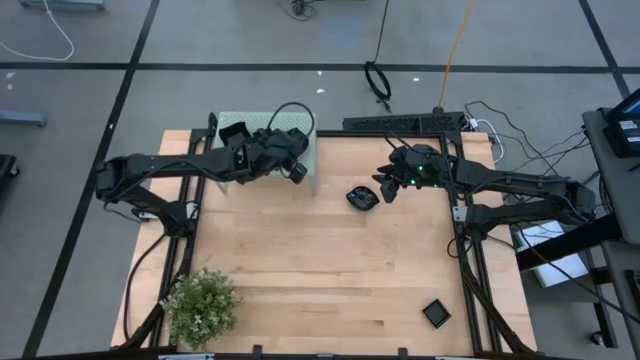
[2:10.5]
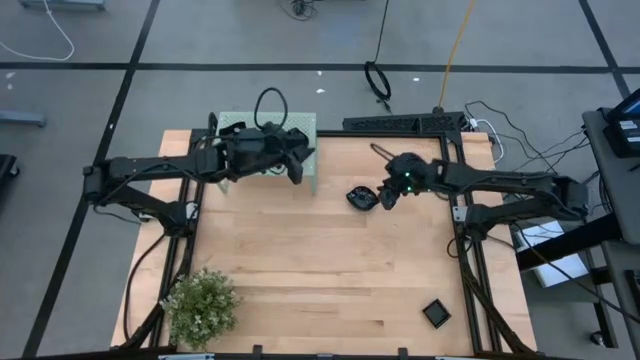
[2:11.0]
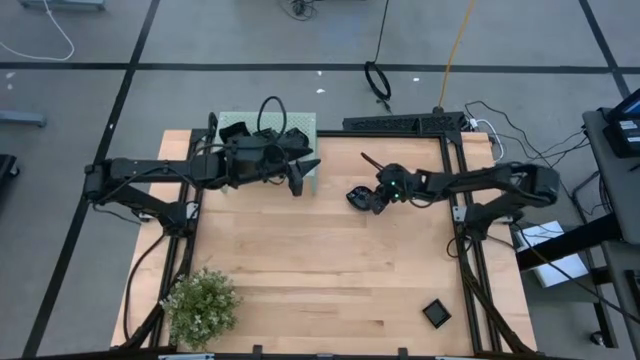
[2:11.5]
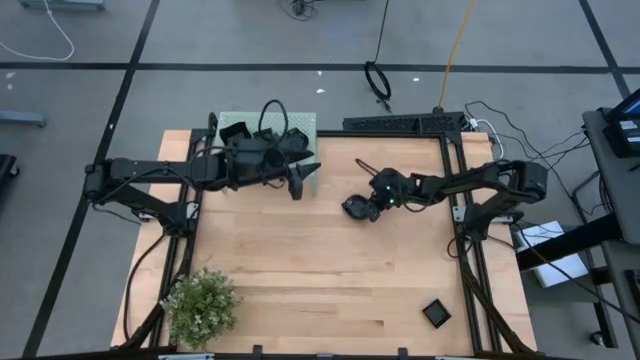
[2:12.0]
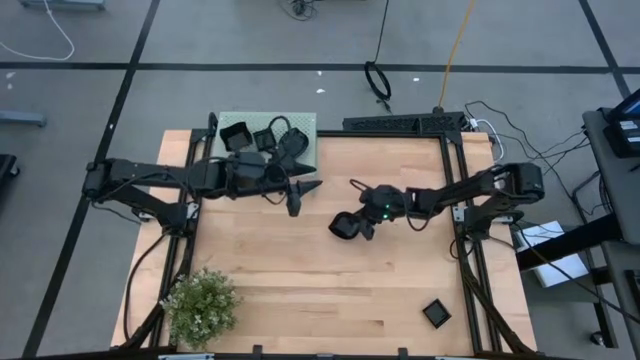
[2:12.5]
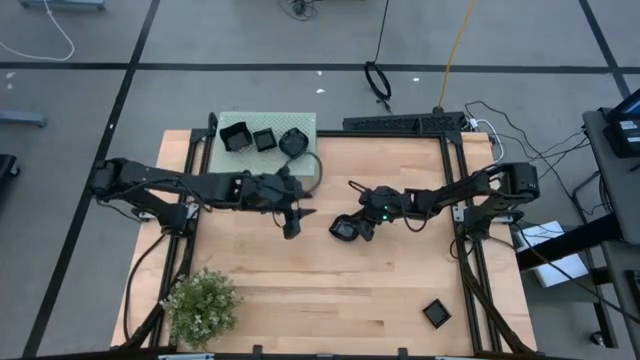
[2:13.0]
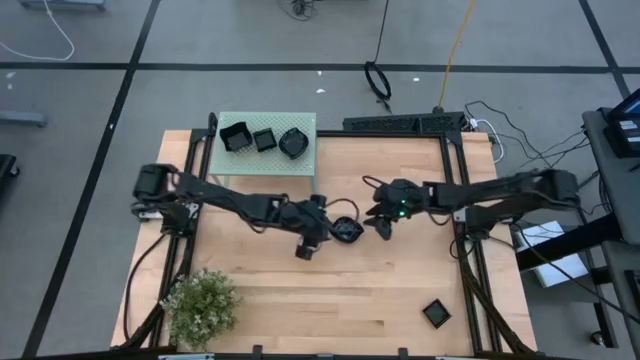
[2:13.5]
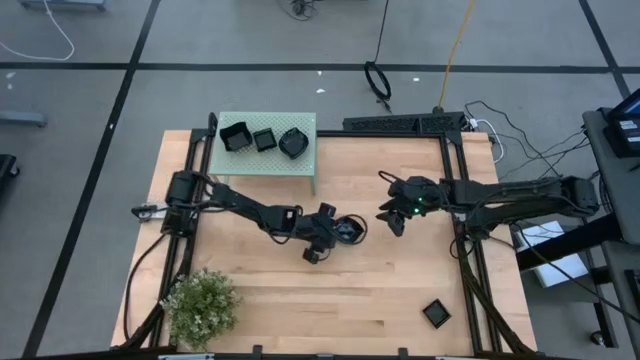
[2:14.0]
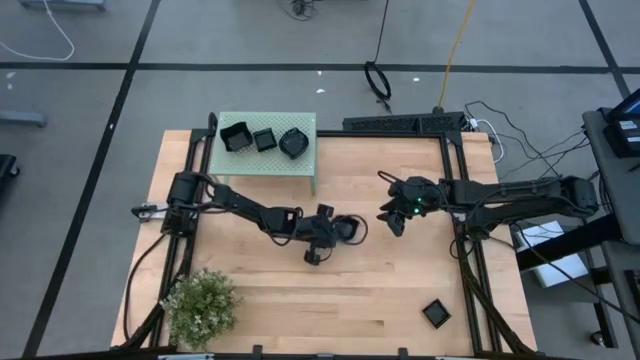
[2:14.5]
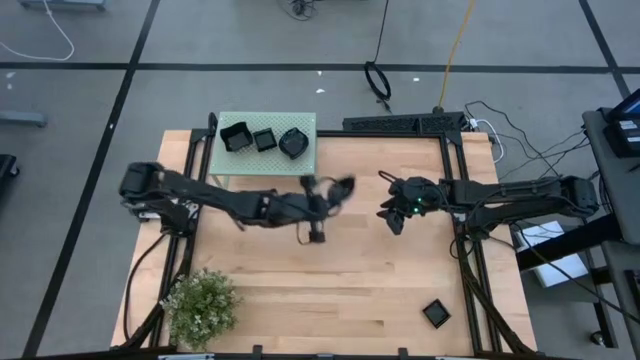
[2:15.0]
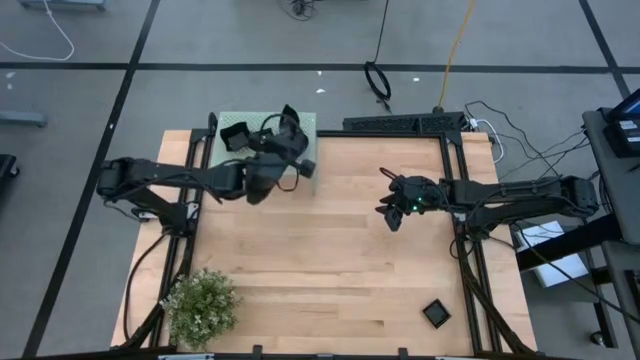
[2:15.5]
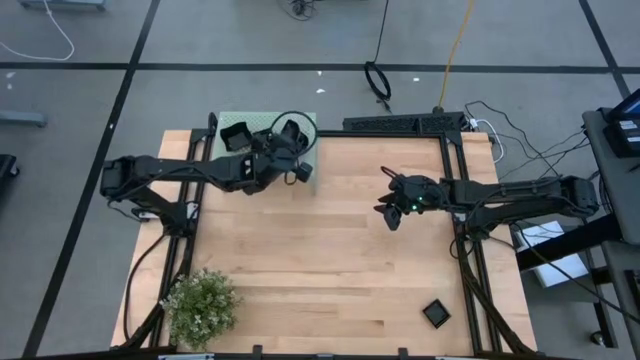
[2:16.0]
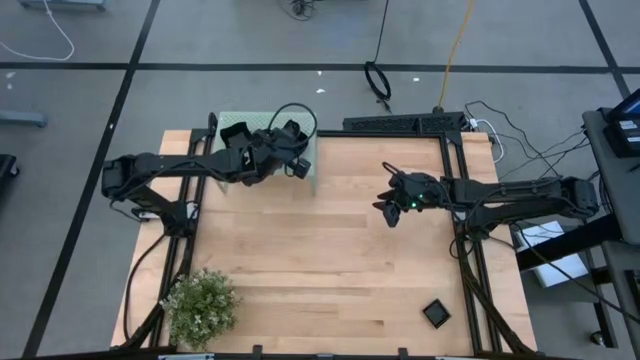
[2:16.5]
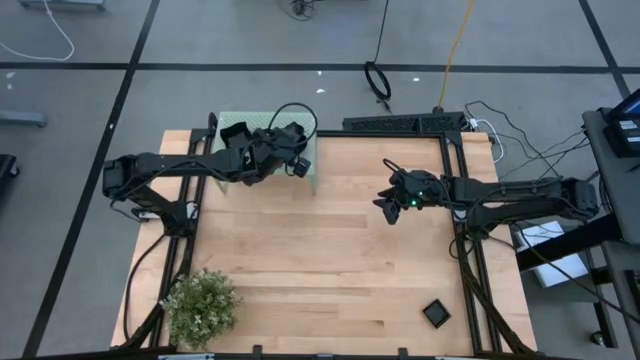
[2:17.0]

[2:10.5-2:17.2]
Task: Pick & Place Mini shaped plates
Stack the leaf shaped plate on top of the leaf shaped plate on the shelf

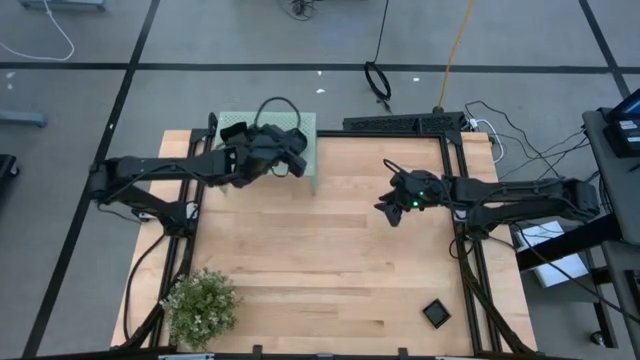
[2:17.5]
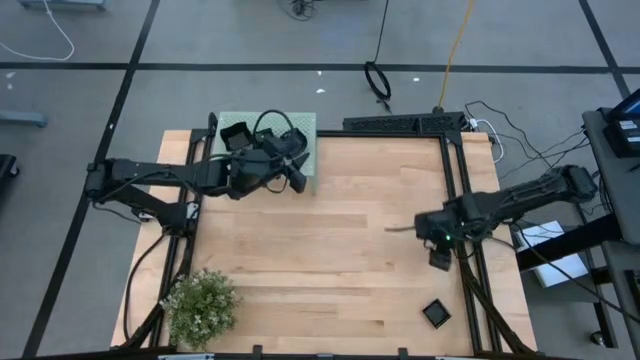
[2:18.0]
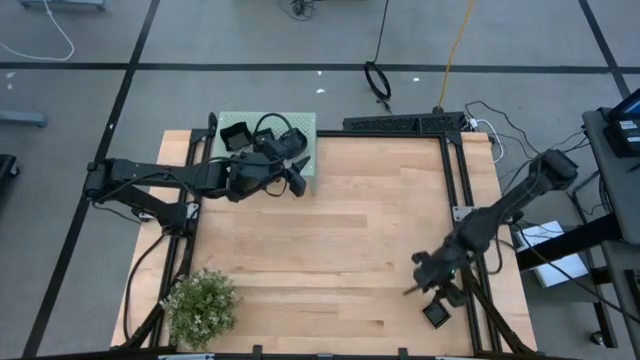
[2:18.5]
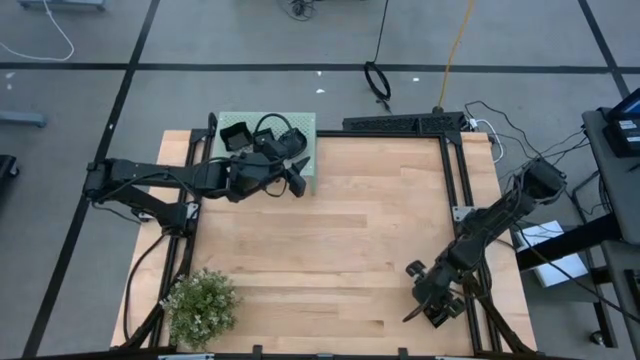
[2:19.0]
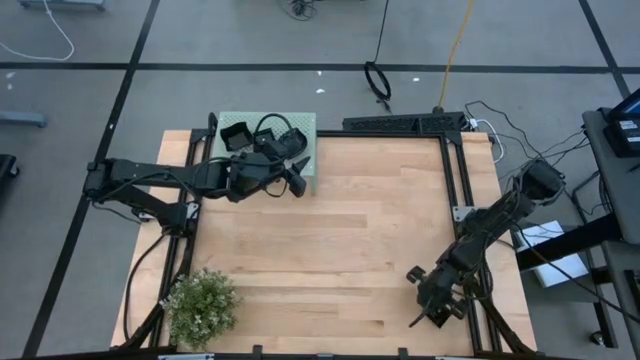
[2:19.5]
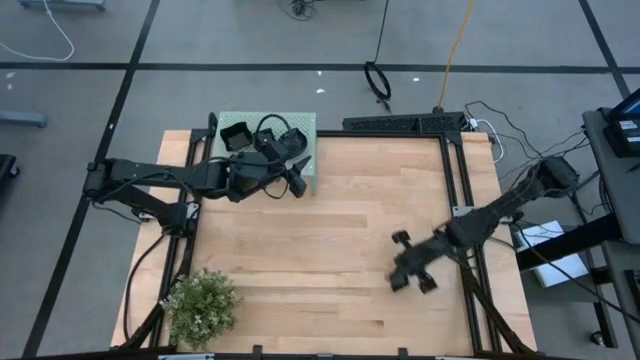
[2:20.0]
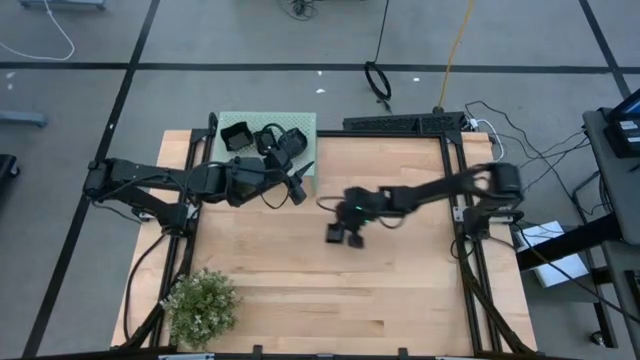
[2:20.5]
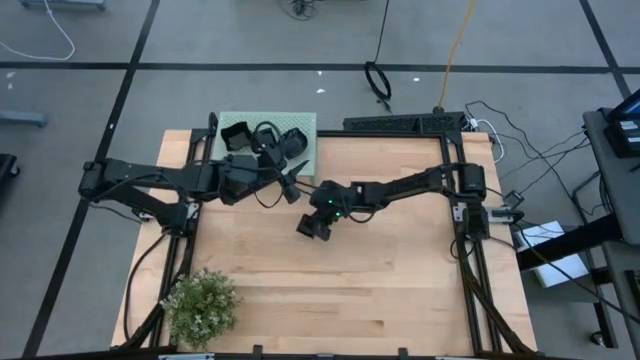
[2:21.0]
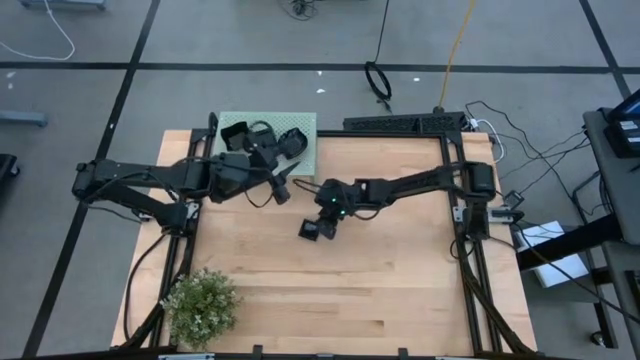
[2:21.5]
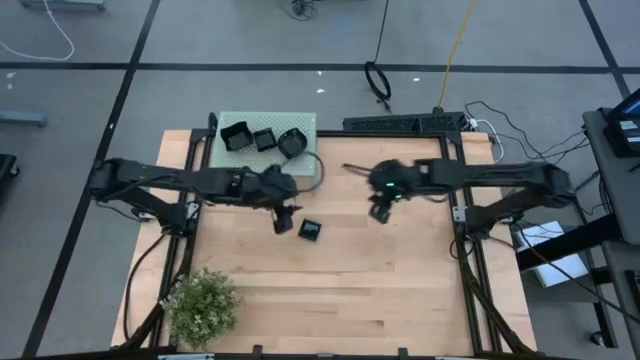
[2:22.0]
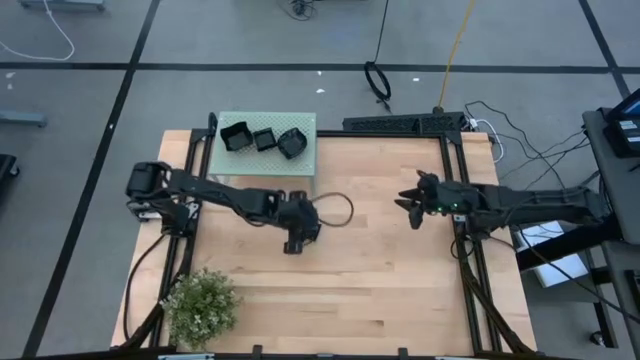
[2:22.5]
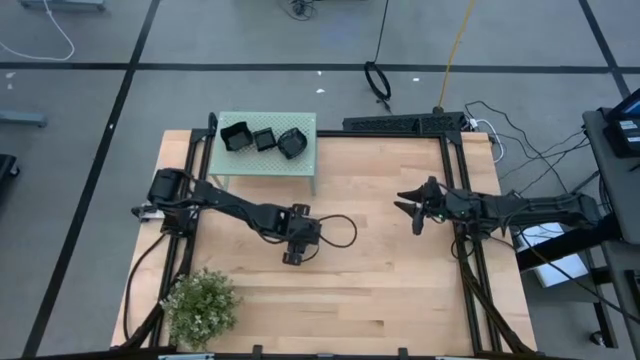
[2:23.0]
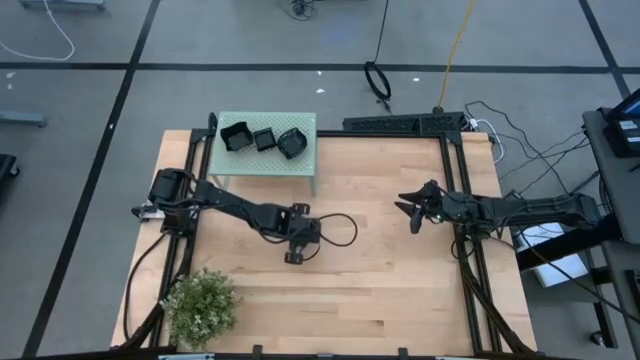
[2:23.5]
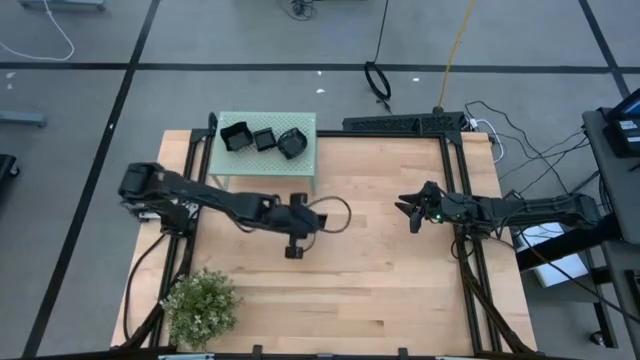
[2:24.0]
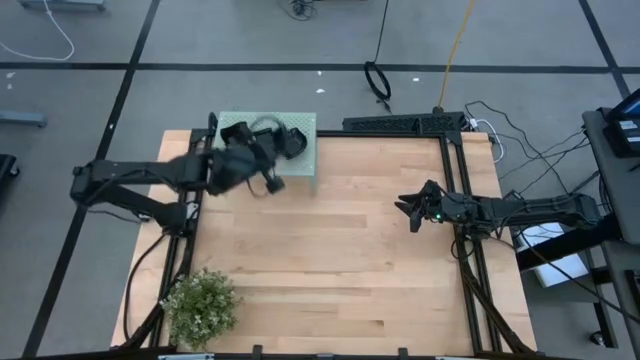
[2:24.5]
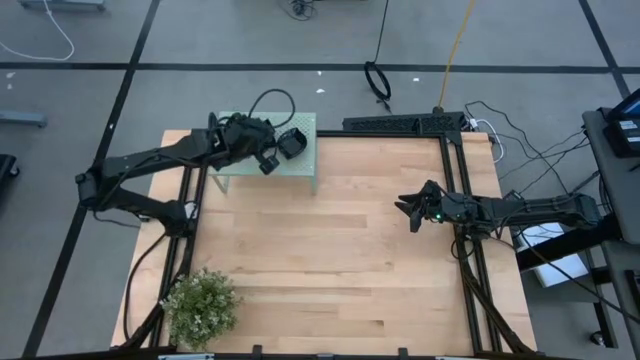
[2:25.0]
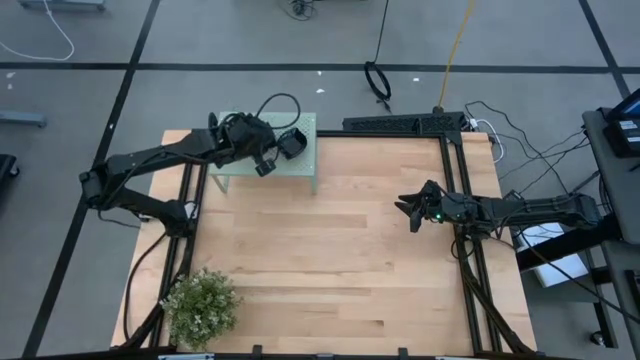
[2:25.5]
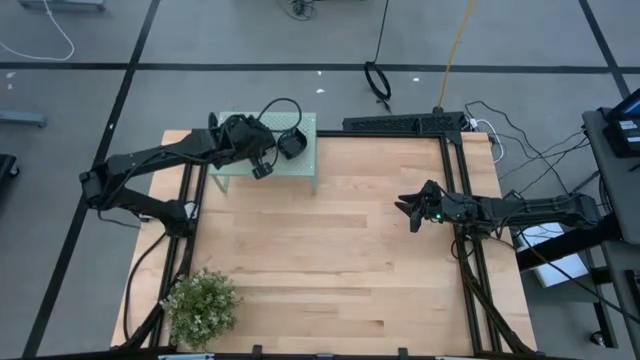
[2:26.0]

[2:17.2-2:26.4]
Stack the square plate on top of the square plate on the shelf

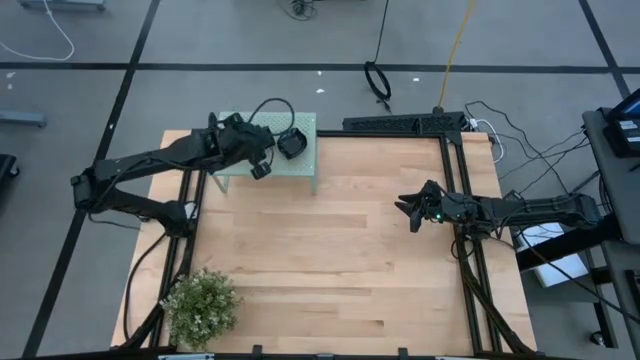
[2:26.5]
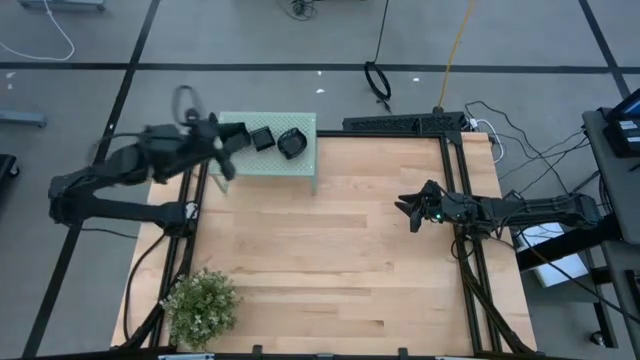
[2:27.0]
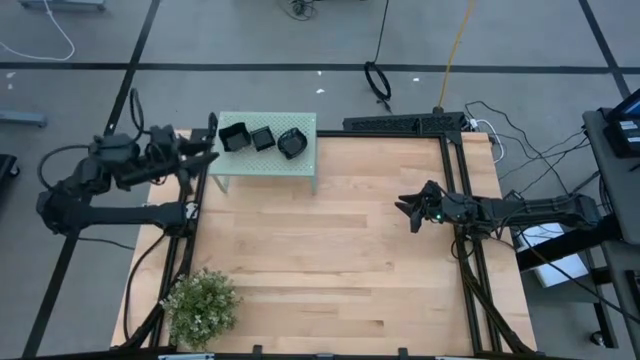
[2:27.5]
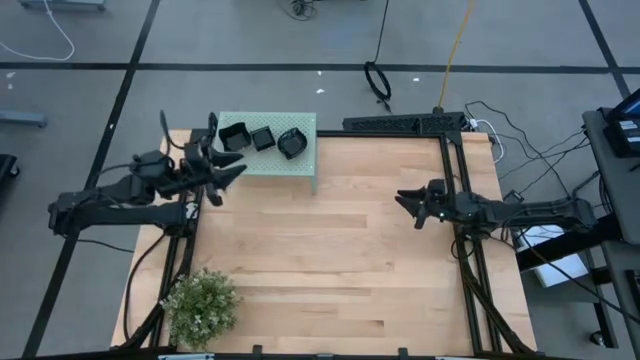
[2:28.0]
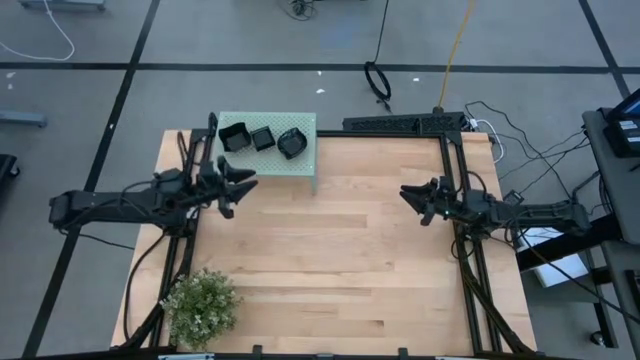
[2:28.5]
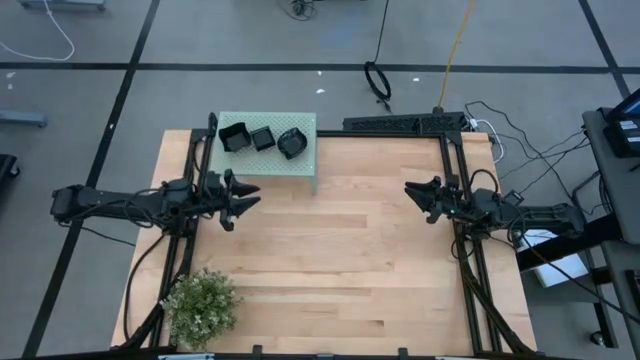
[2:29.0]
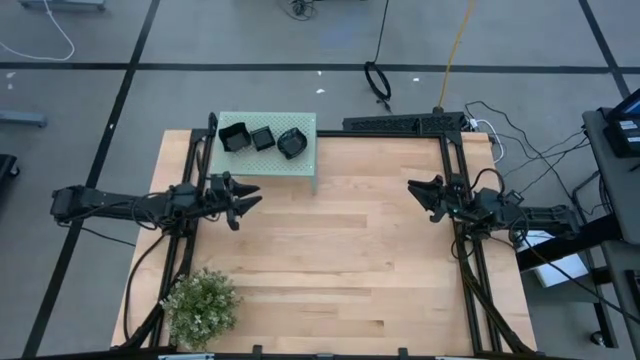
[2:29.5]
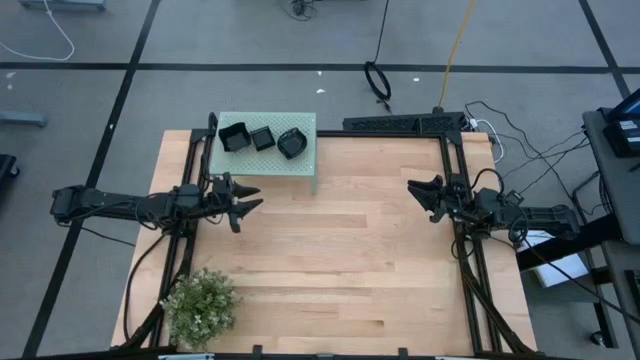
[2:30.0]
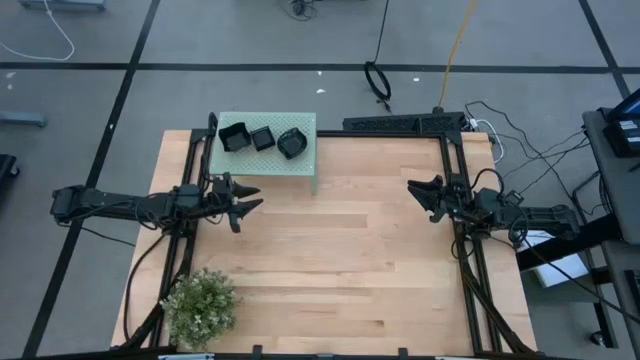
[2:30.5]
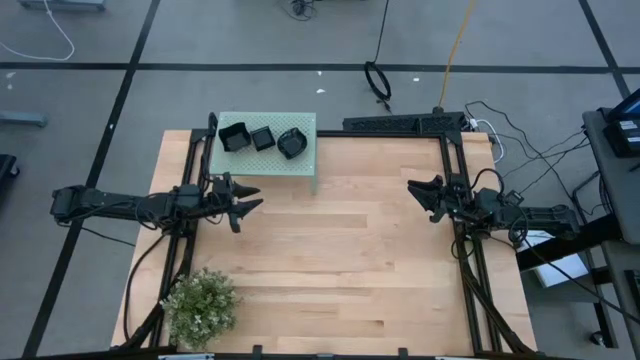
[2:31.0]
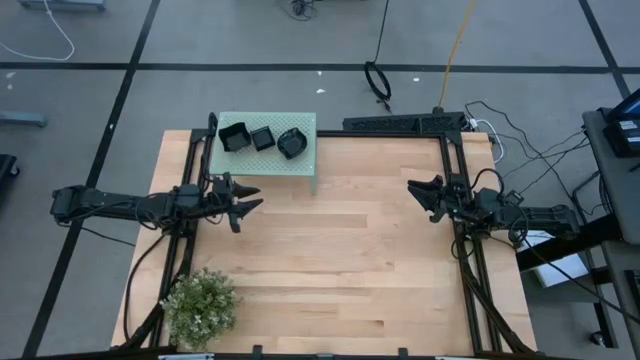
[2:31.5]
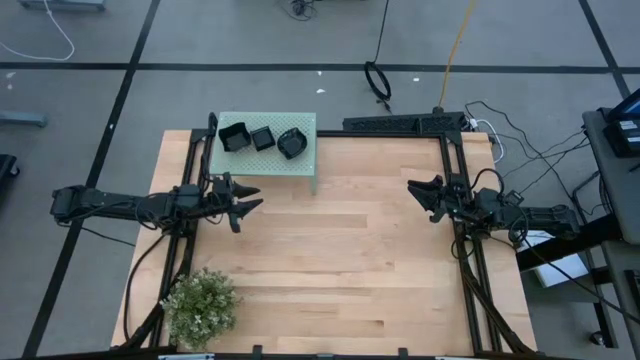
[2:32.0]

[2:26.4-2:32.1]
Return to Home Position
